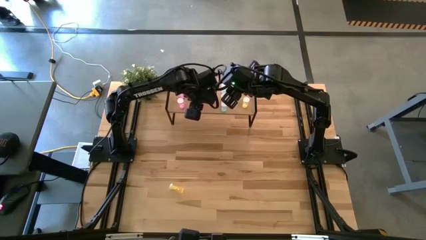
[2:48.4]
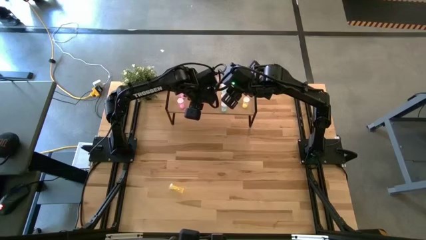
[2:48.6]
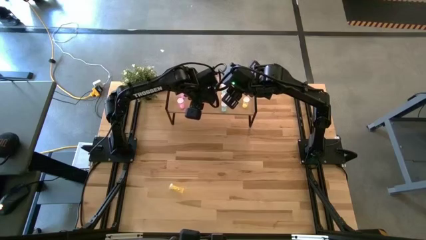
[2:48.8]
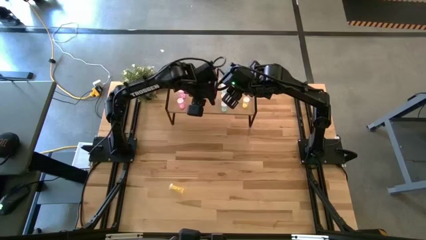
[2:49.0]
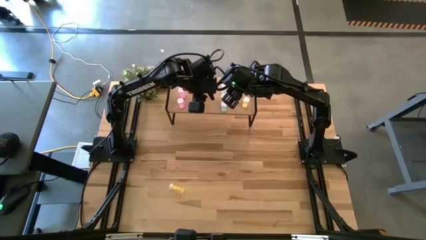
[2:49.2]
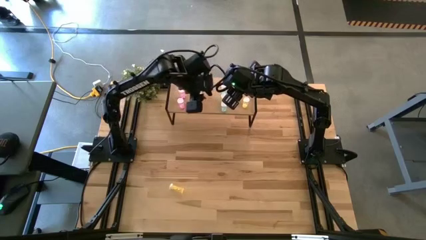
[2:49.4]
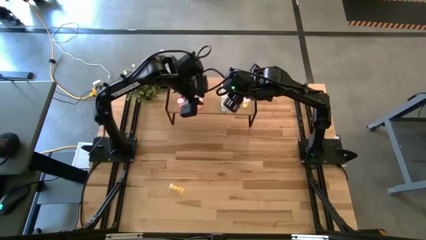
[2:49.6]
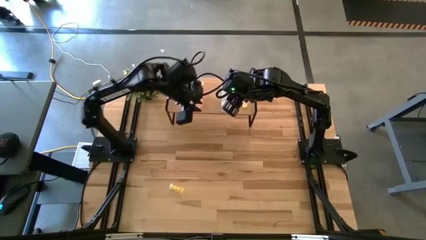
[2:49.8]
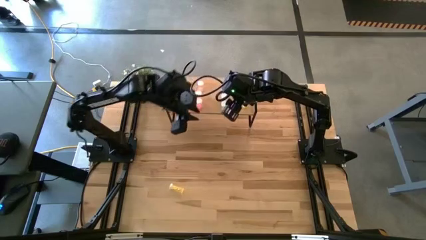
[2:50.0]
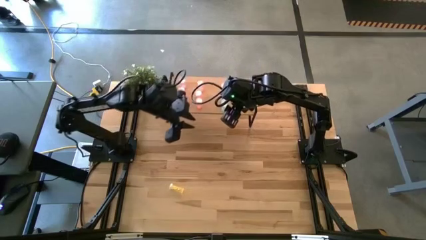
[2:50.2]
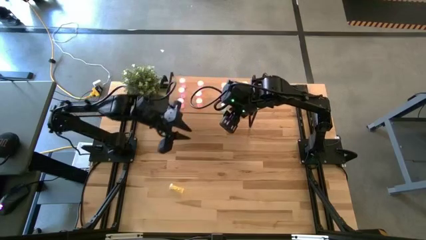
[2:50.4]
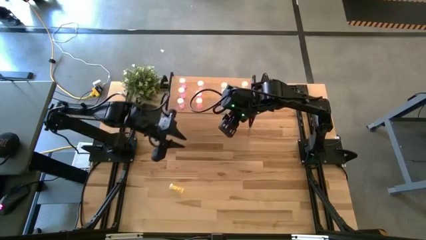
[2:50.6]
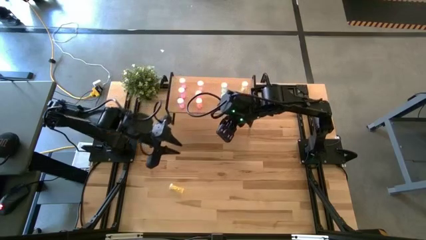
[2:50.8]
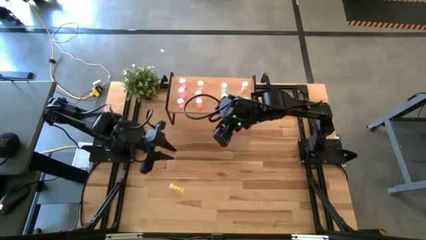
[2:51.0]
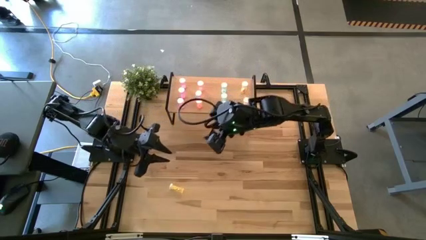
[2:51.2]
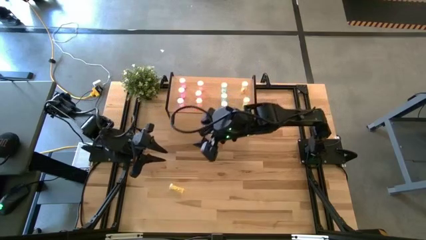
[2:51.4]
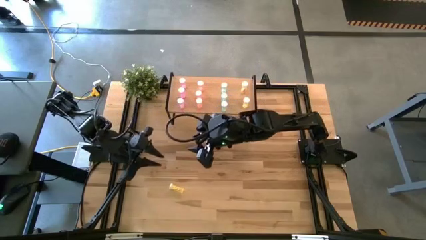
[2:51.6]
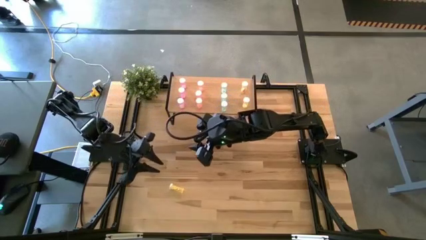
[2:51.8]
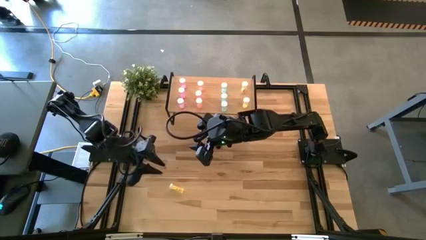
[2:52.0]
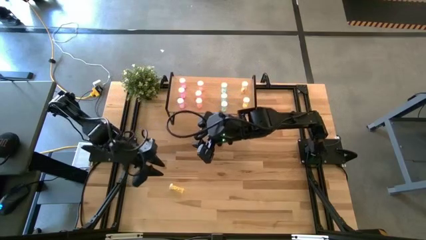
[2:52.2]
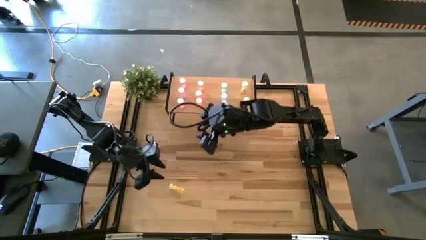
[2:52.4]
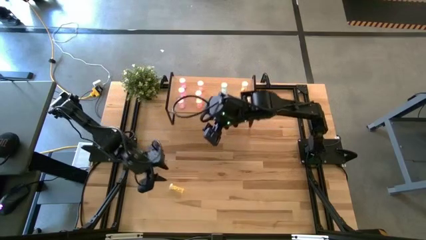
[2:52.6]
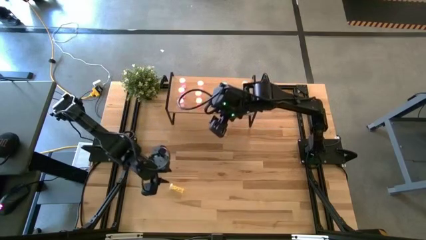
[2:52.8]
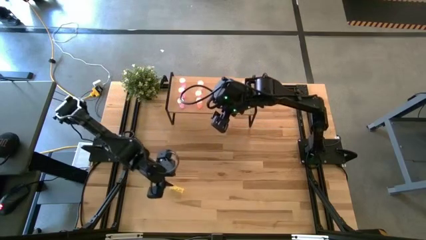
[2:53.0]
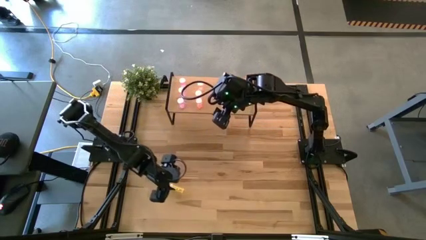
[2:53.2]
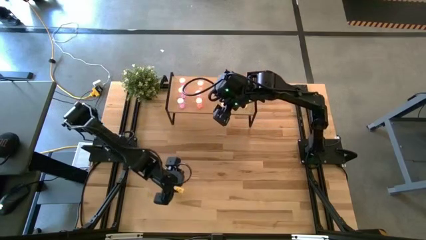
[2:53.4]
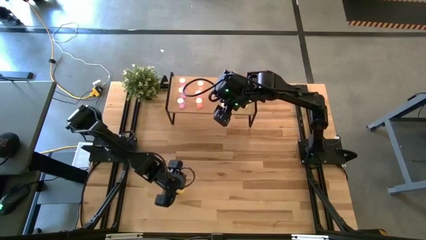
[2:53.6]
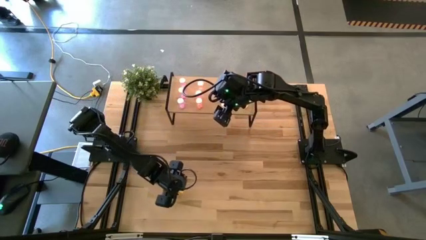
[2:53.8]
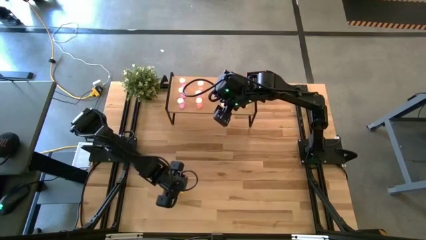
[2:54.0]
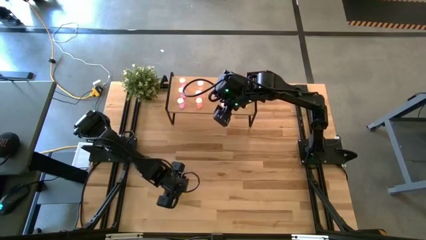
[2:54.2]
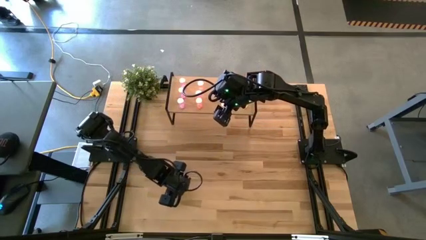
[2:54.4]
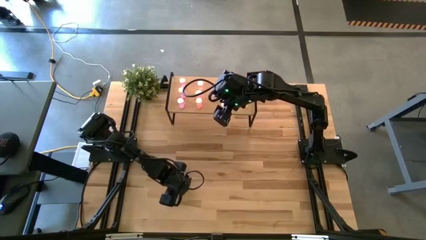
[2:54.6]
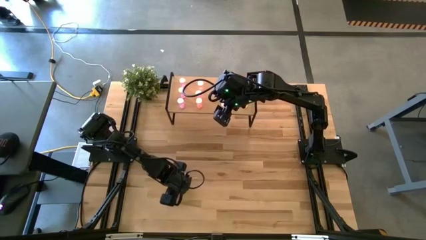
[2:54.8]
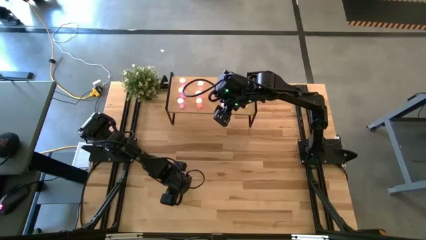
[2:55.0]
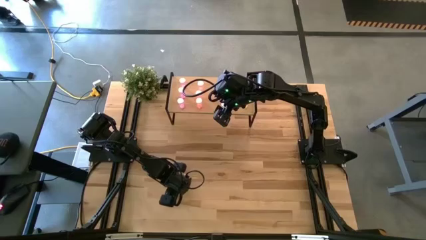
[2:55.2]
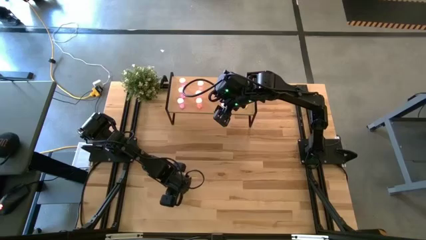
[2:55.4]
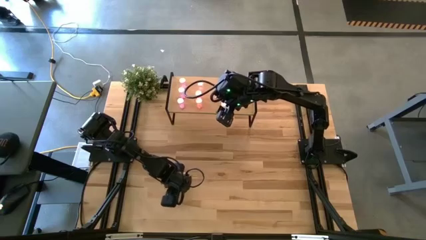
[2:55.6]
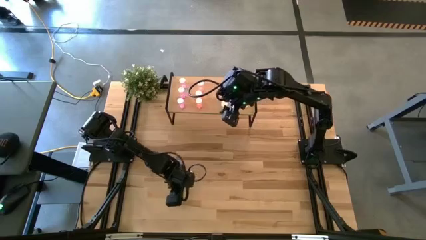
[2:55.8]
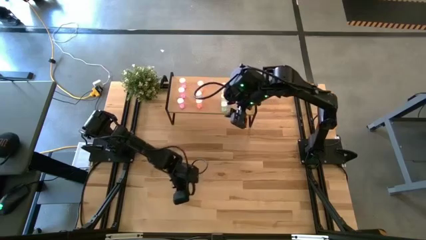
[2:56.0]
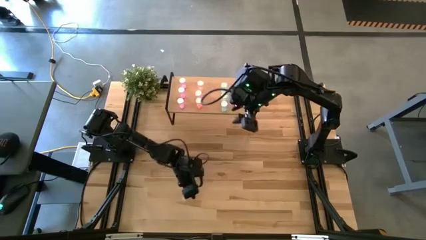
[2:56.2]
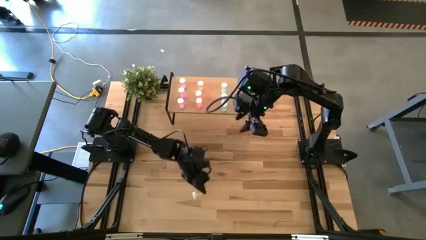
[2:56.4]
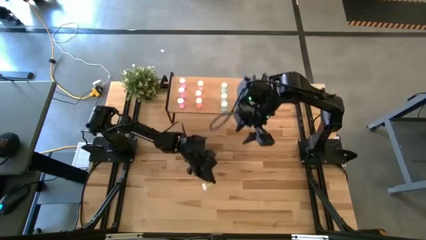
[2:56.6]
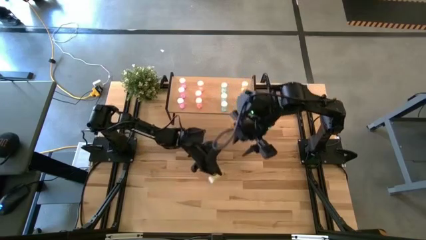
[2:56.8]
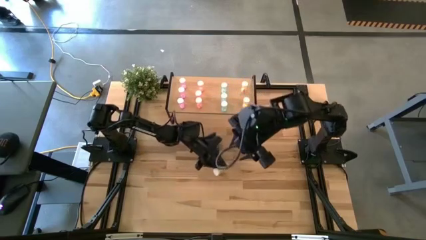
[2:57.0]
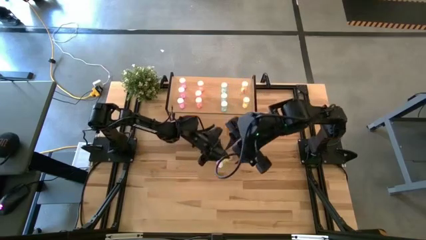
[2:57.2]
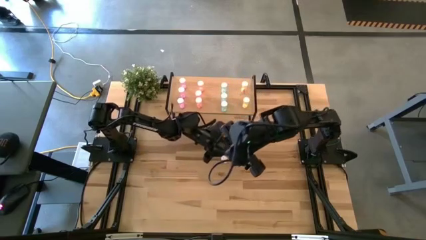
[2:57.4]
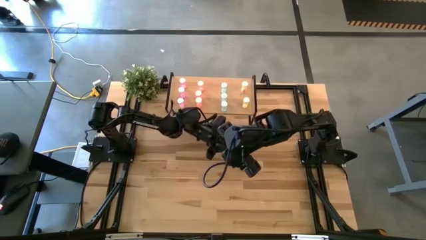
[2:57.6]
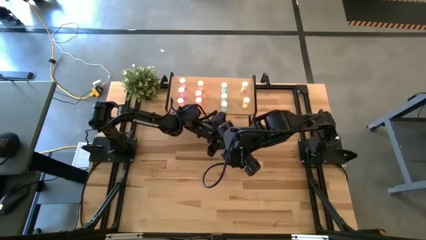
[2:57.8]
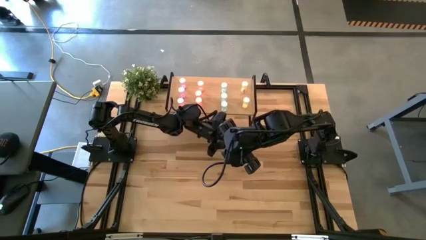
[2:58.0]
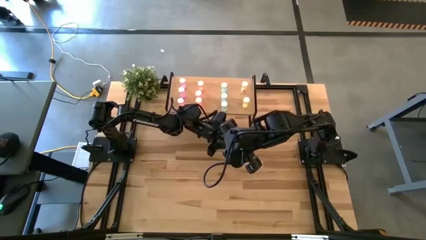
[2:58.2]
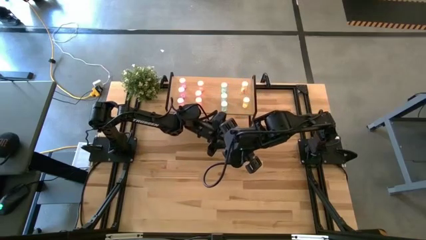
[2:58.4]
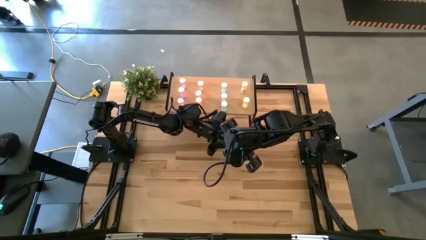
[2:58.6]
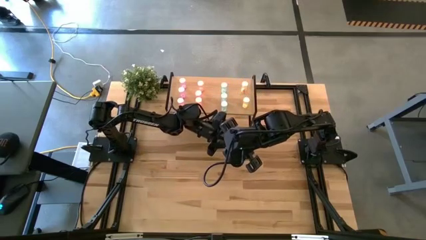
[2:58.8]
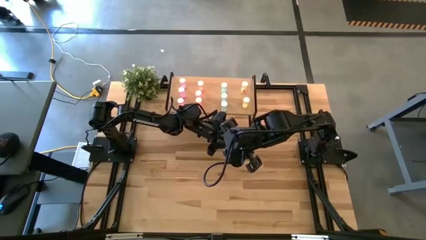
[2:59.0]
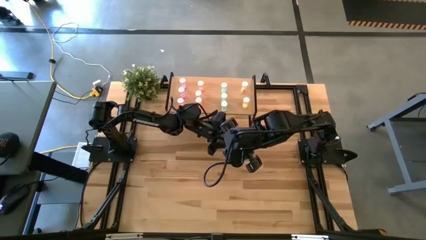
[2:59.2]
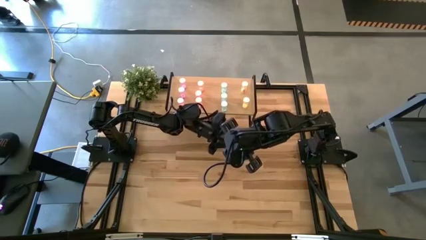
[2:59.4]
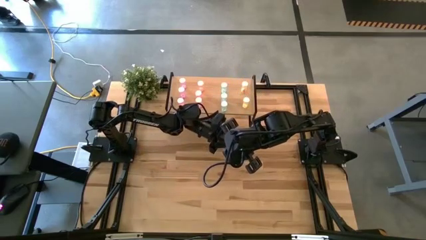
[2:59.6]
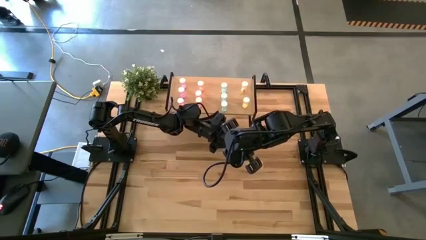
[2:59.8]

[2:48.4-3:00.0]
Task: Pick and place medicine bottles onto shelf by color
Put the yellow pill bottle on the shelf aligned with the other yellow pill bottles
